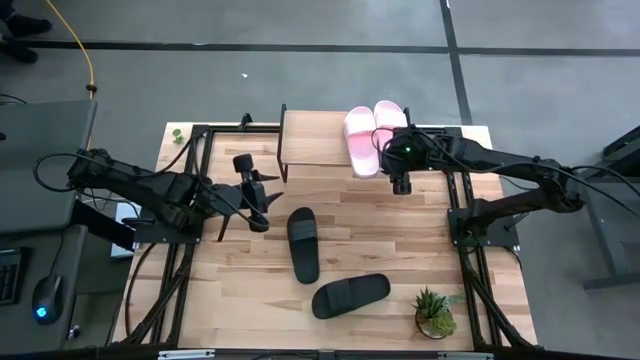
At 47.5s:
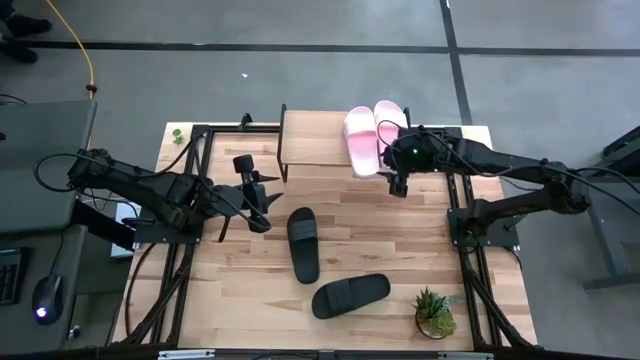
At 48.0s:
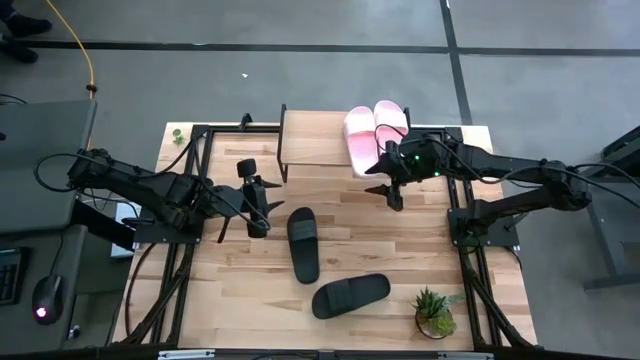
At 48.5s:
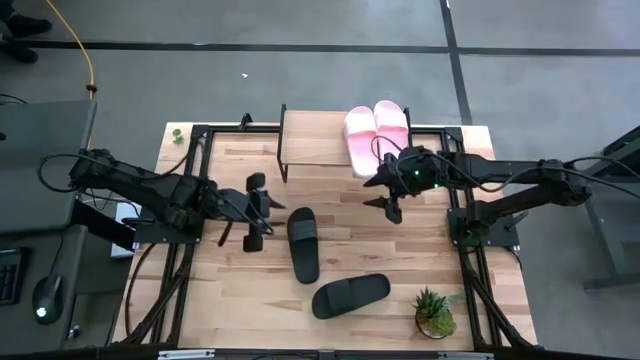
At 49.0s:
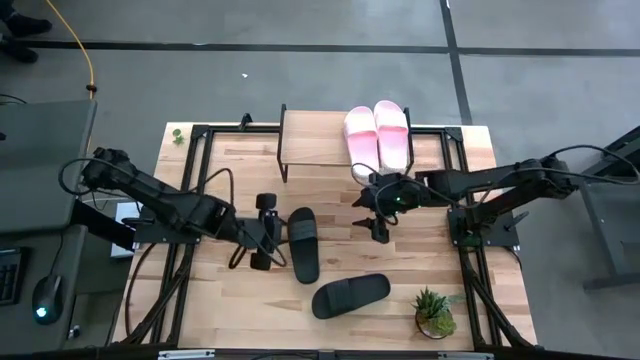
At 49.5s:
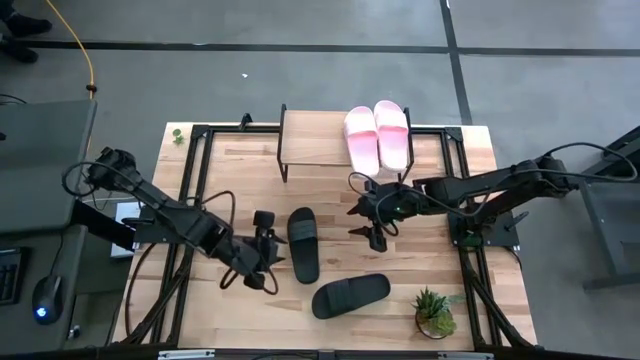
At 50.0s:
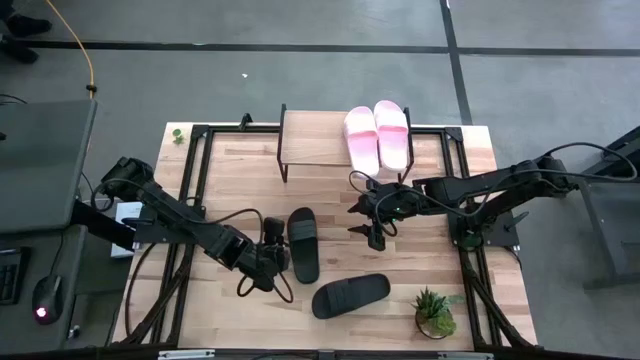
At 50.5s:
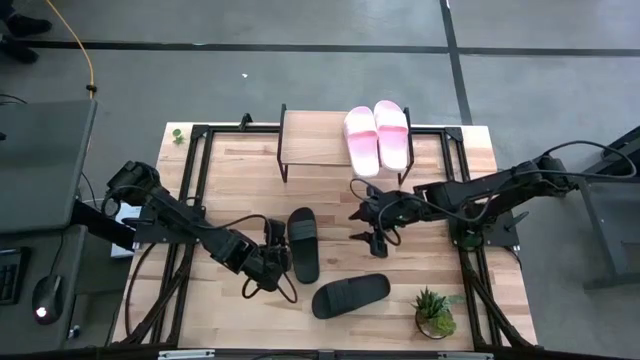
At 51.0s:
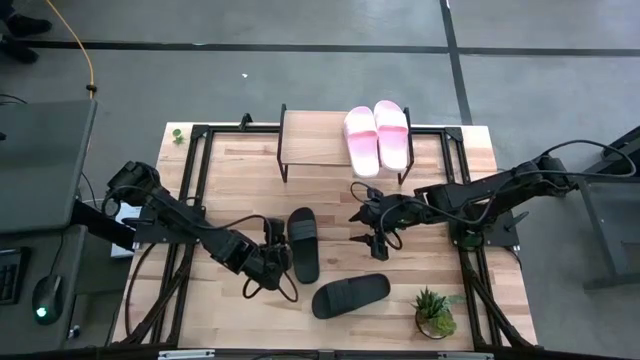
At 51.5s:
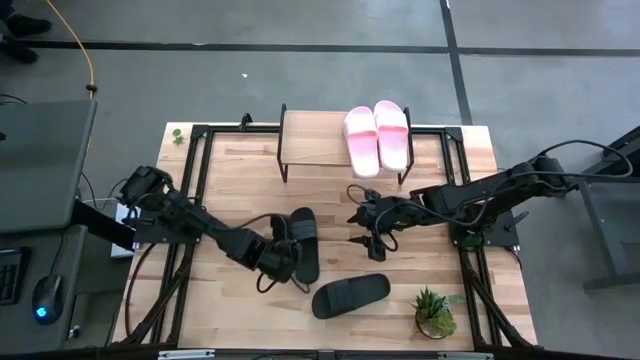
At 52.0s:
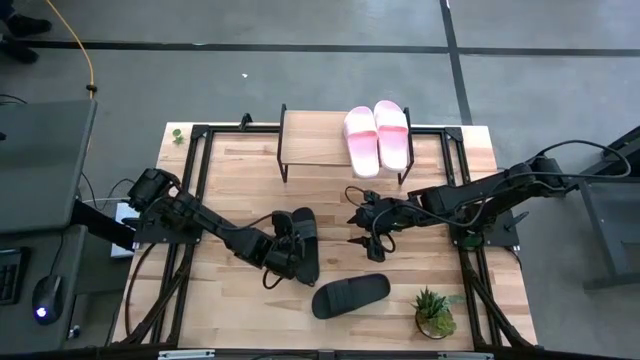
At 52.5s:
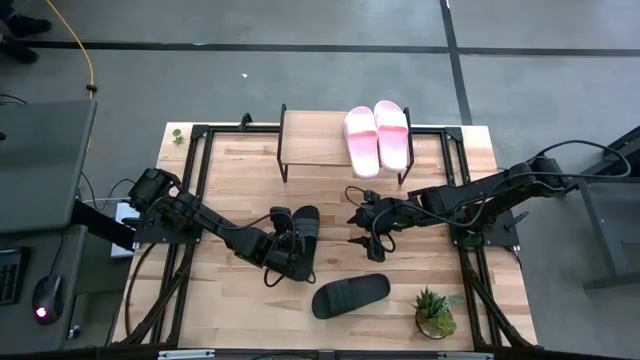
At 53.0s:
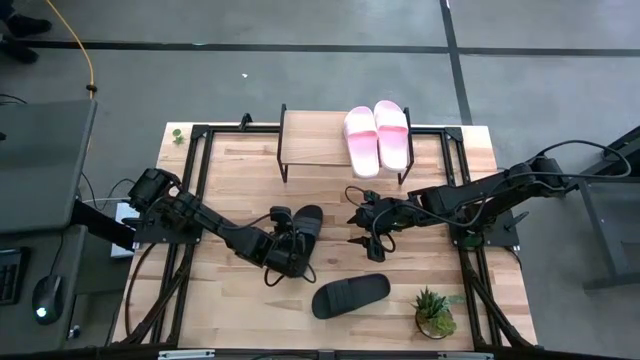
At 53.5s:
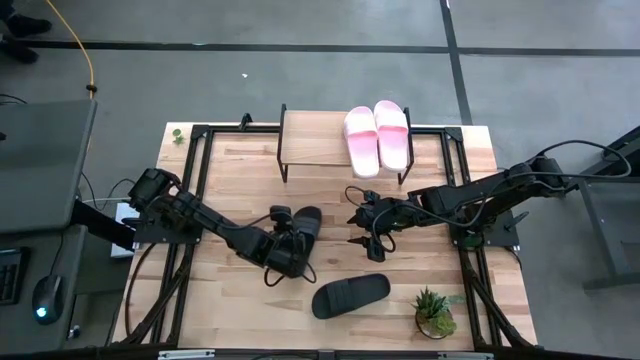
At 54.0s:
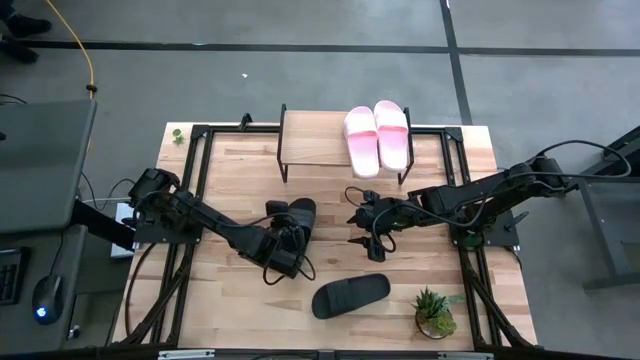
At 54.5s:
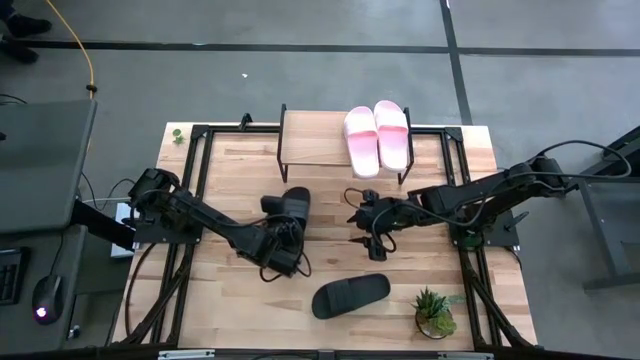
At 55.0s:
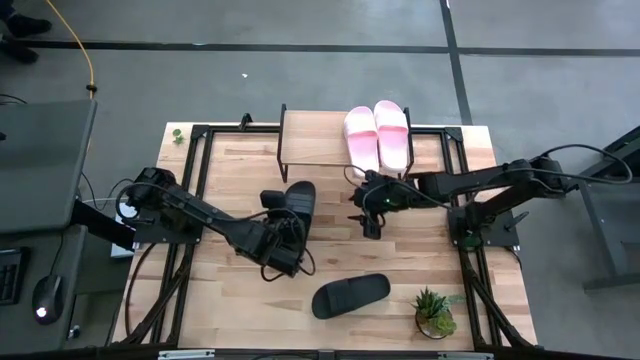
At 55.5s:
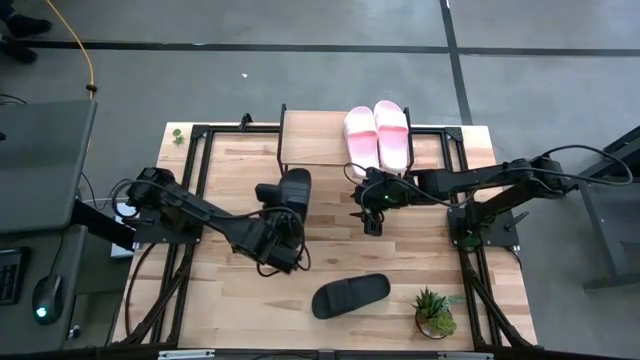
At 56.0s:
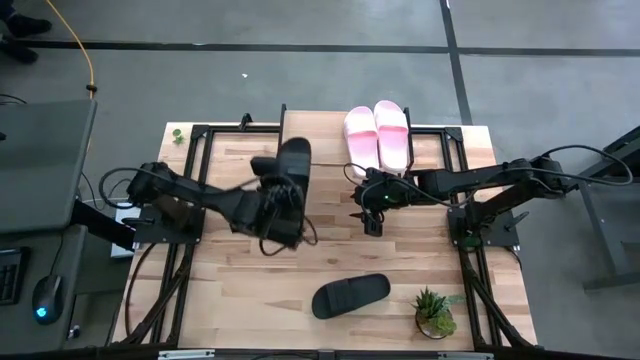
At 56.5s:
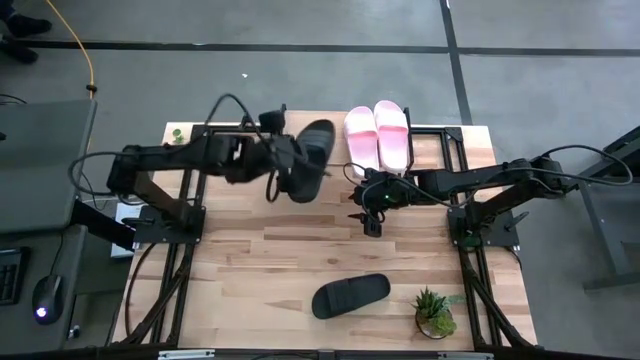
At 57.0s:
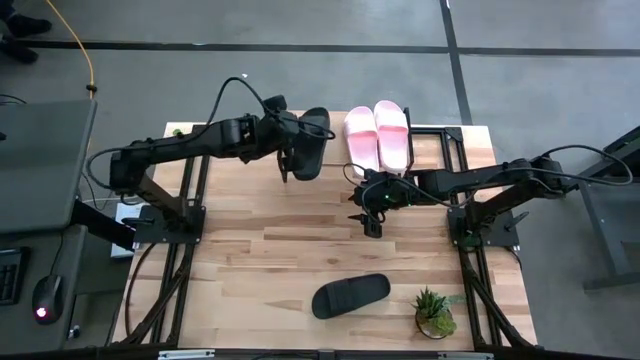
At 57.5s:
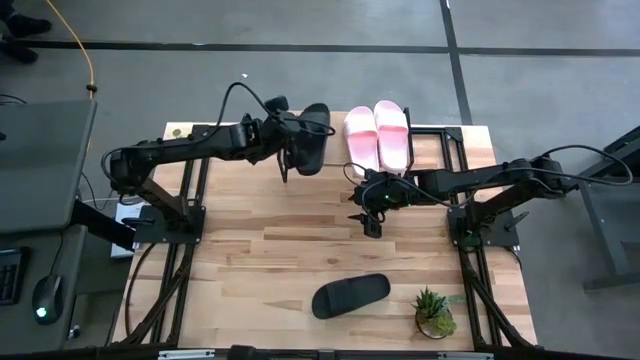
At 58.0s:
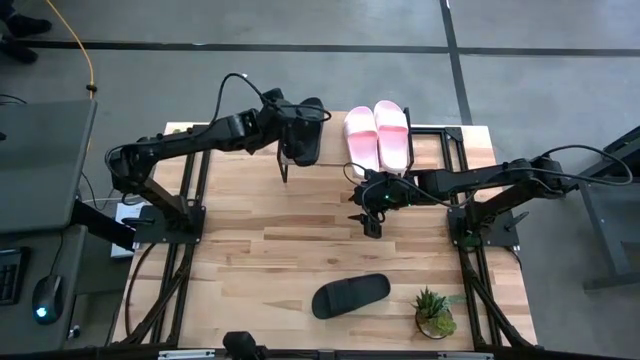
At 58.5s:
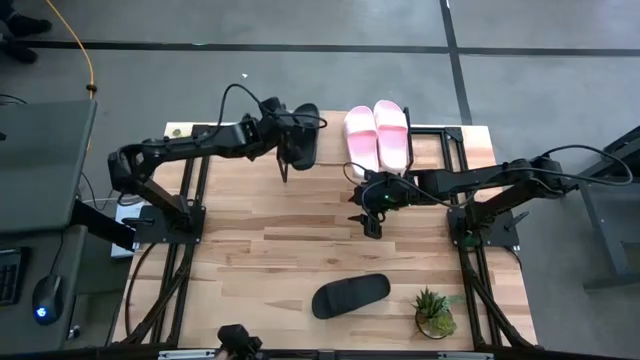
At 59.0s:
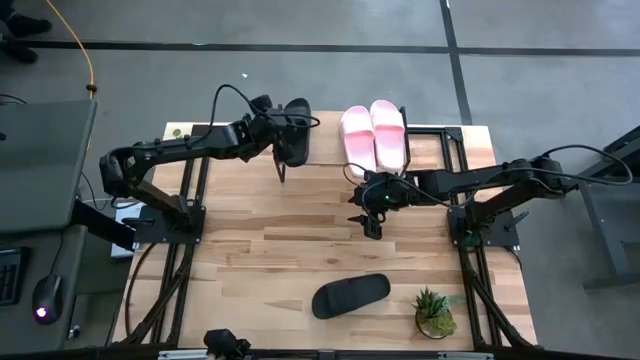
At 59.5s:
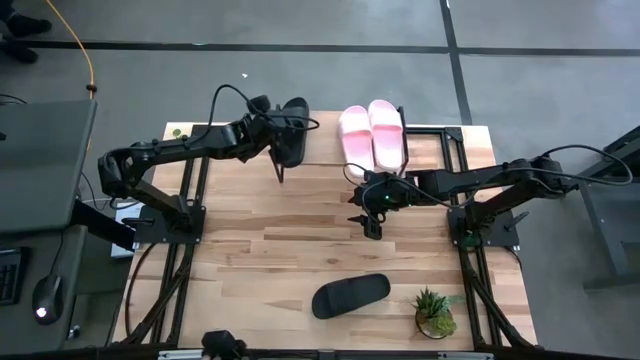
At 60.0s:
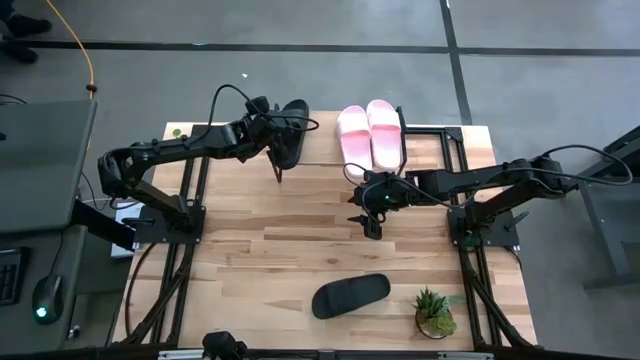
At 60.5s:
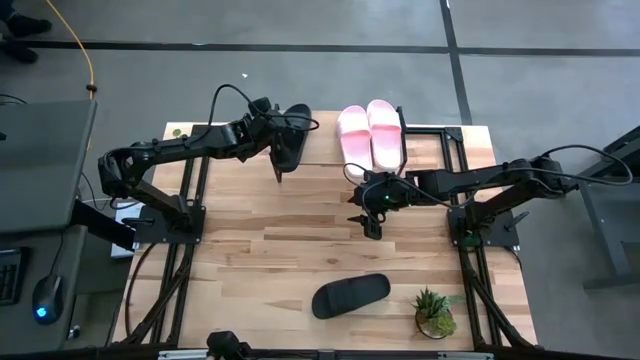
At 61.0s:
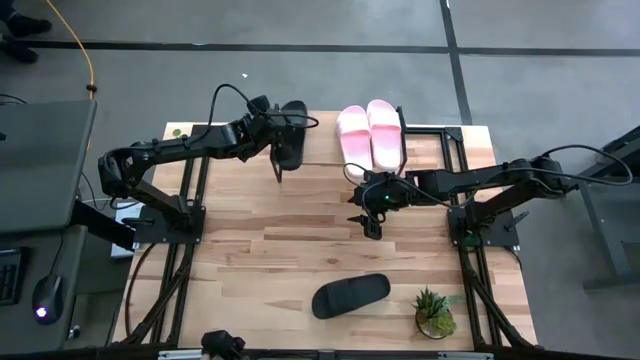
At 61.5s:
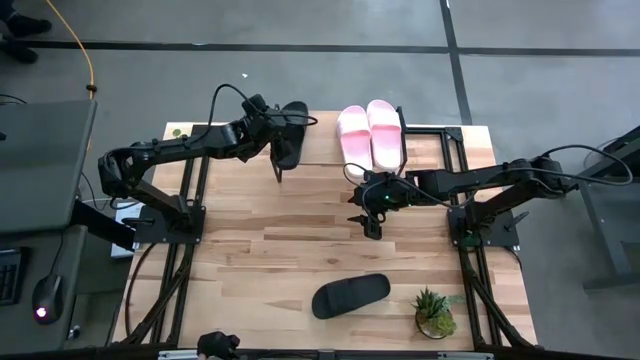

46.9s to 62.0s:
Task: Pick and place slides into the shelf
Put the top black slides on the shelf

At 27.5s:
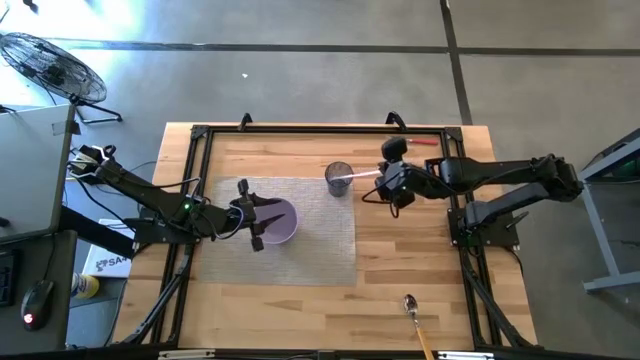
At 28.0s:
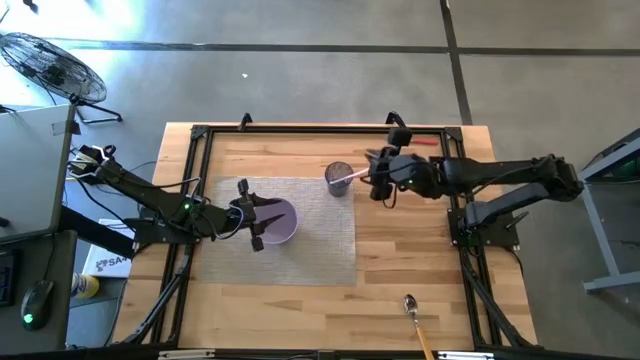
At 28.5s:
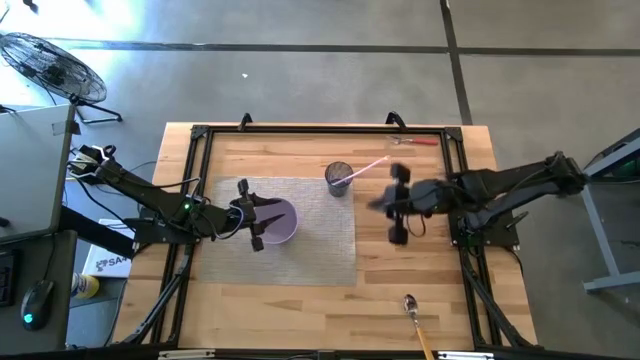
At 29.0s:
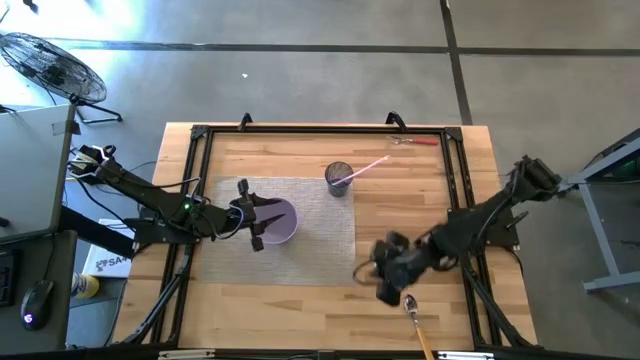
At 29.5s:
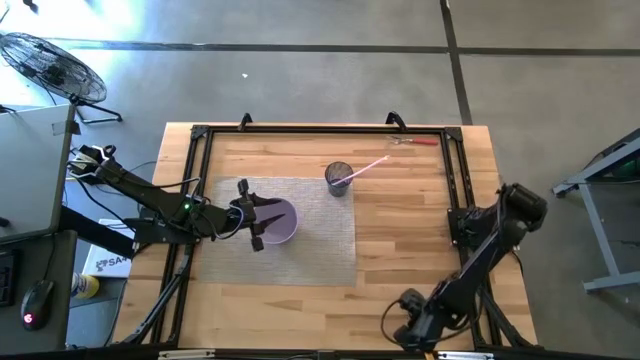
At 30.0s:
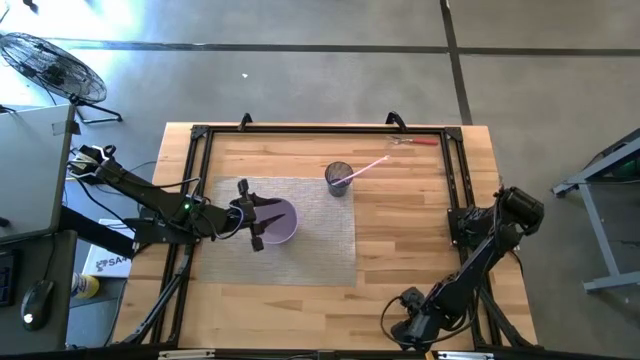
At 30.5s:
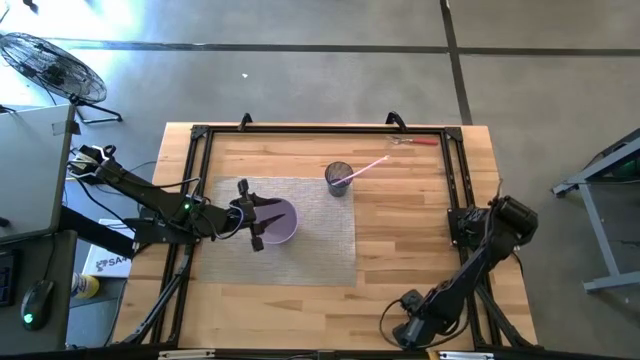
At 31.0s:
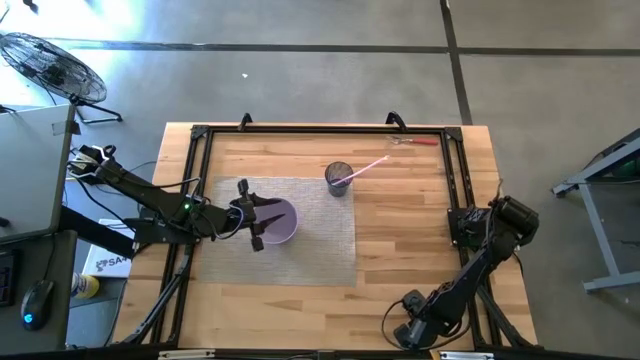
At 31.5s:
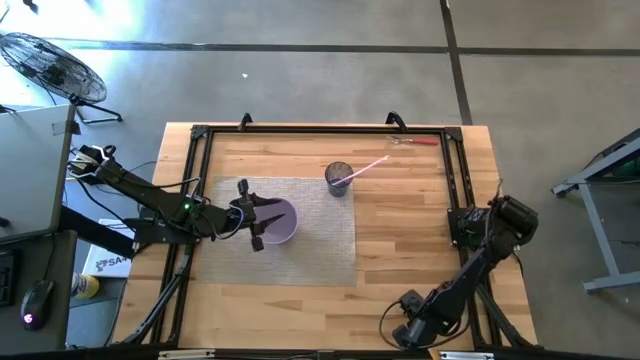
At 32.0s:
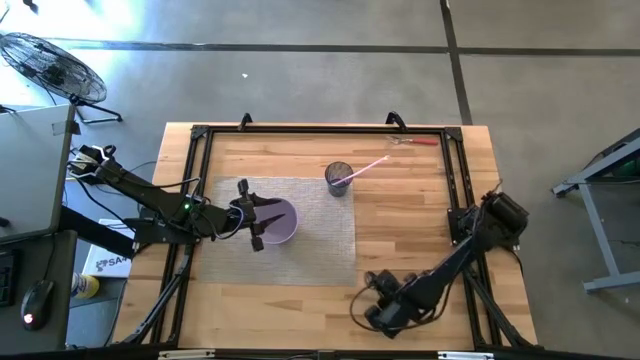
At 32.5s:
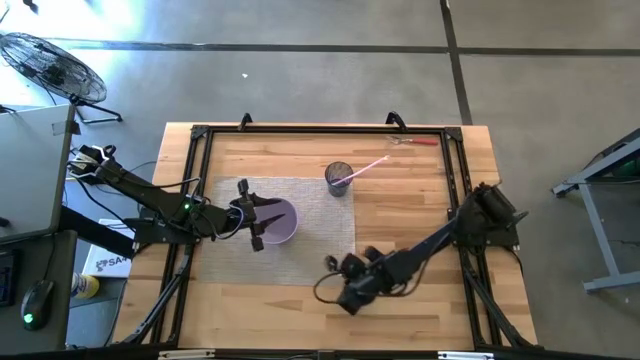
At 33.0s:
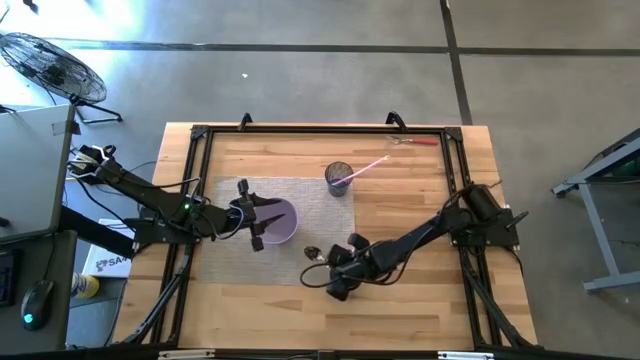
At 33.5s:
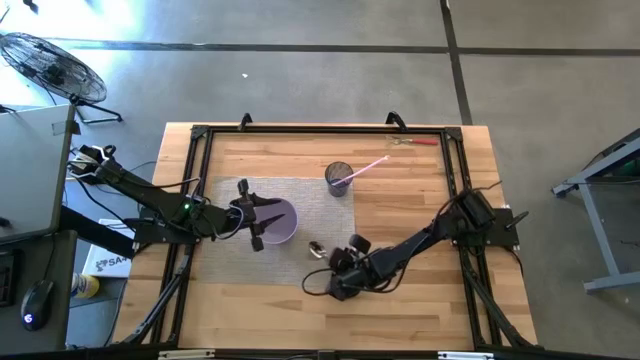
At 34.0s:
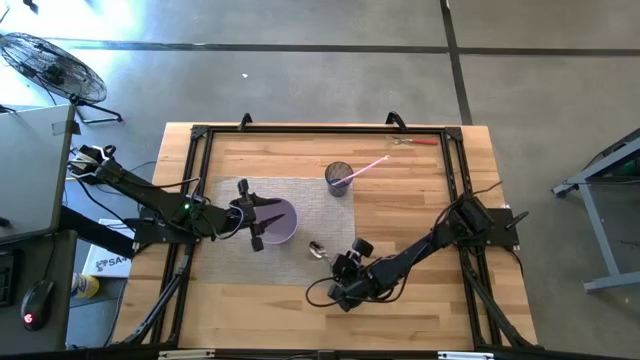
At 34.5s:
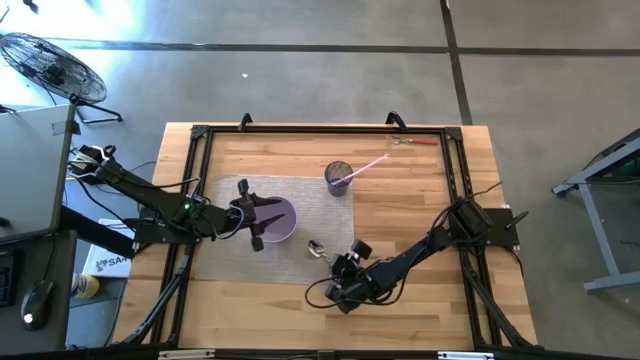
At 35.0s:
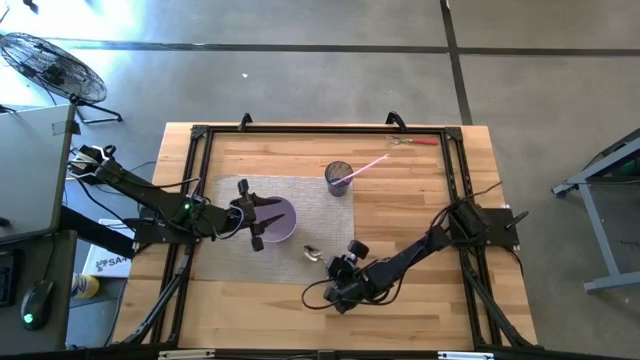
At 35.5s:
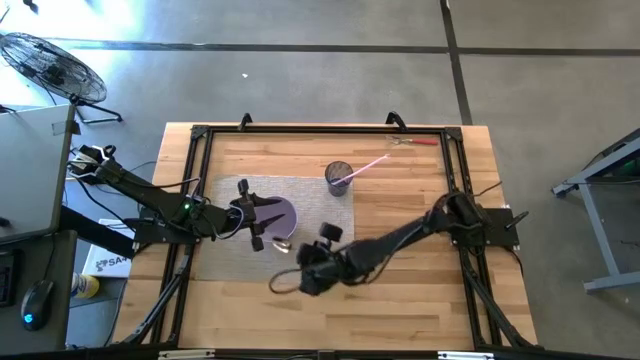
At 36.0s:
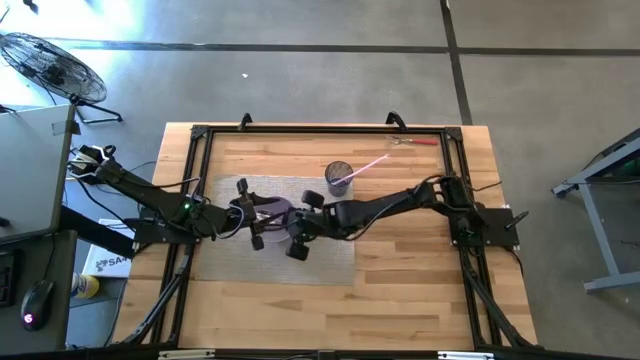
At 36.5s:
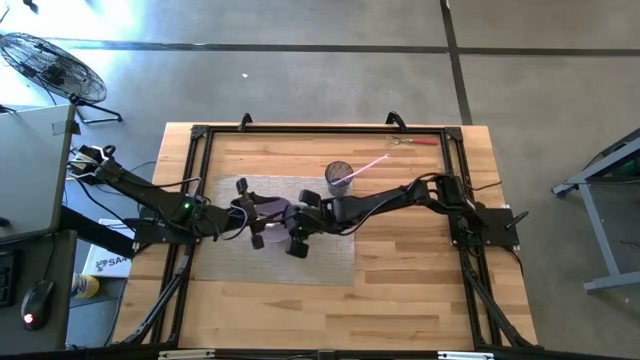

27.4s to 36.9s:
Task: Pick & Place Utensil
Put the yellow spoon into the purple bowl on the gray mat
